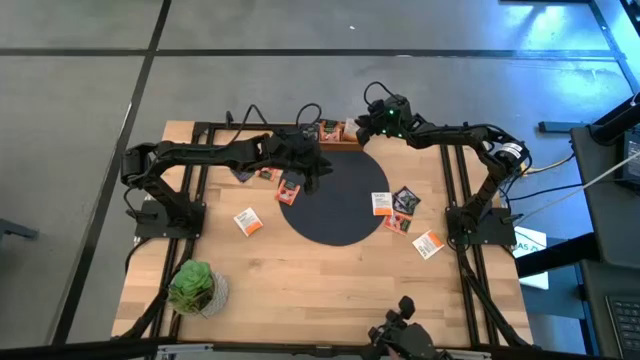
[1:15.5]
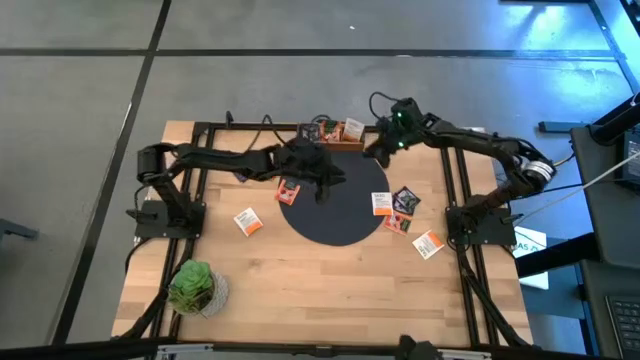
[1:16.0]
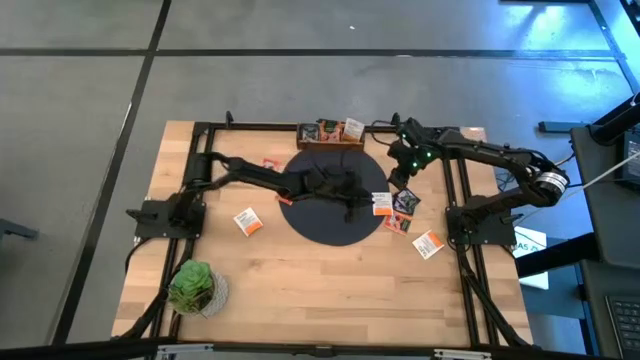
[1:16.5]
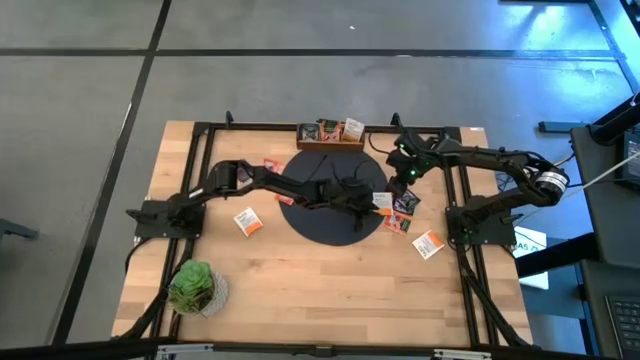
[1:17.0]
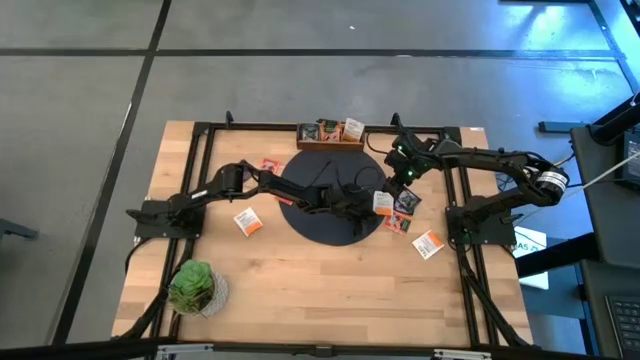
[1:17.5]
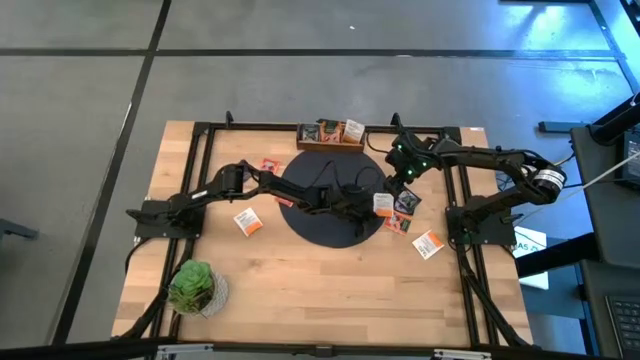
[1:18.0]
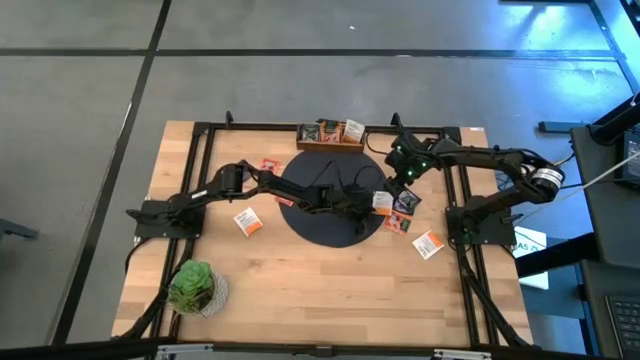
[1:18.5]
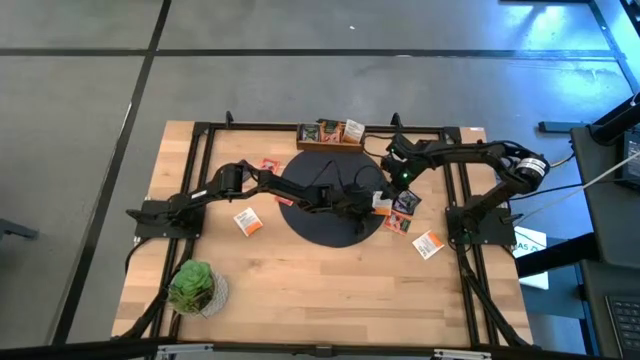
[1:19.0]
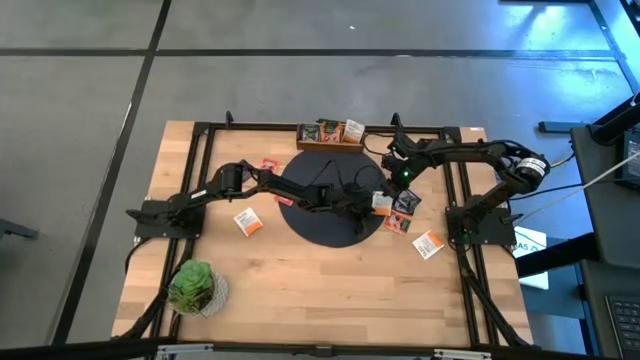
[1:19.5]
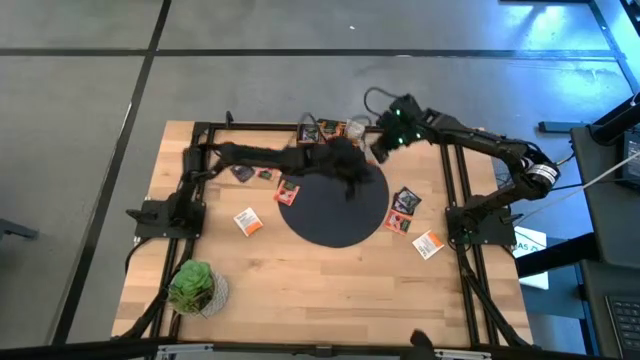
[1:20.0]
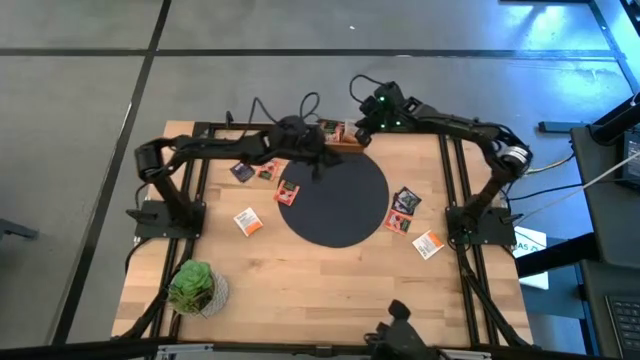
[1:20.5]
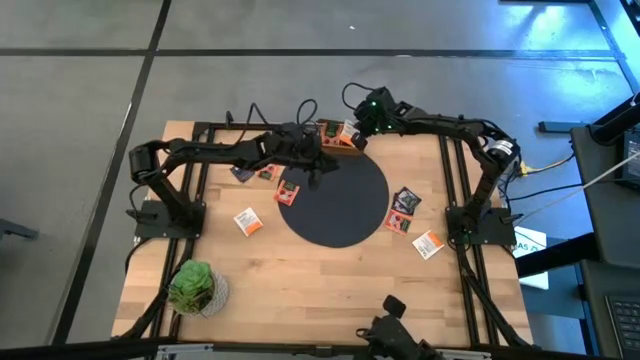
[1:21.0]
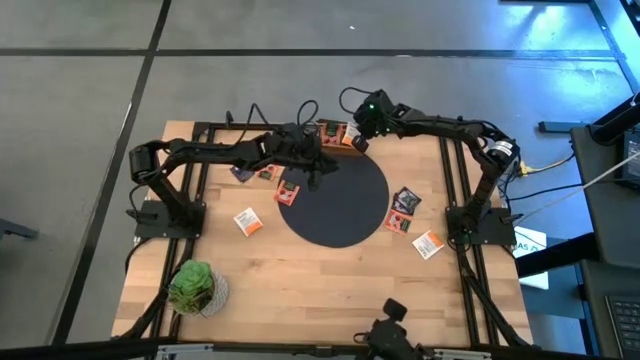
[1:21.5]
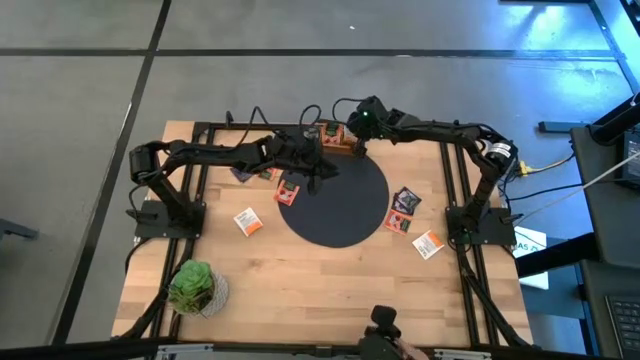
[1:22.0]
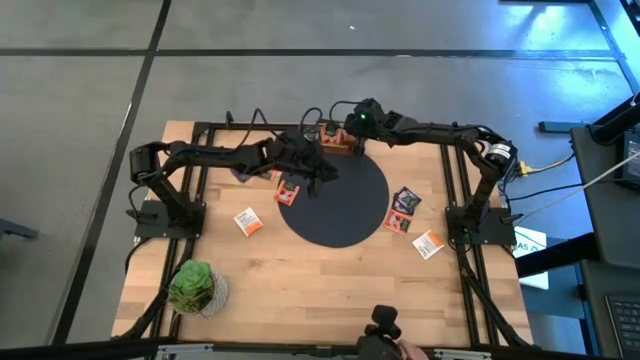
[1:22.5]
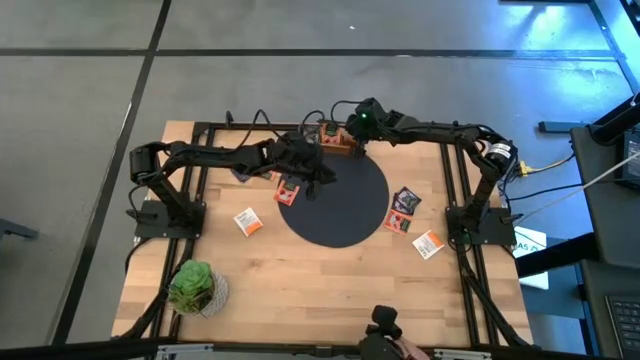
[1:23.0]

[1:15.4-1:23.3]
Task: Pick & Place Tea
Put the white tea bag into the right section of the wooden organizer

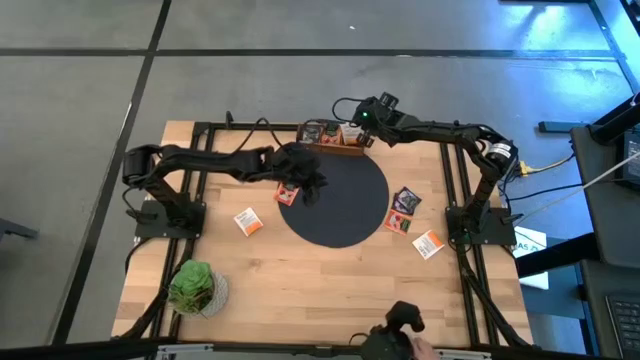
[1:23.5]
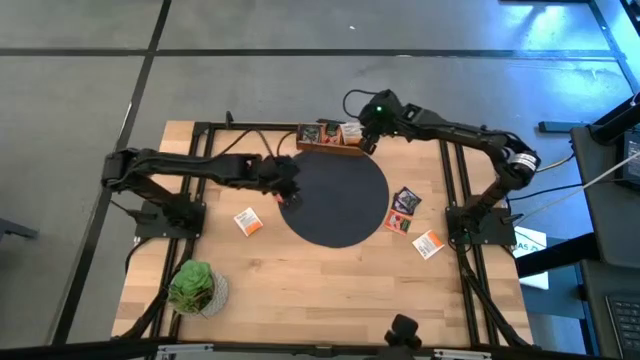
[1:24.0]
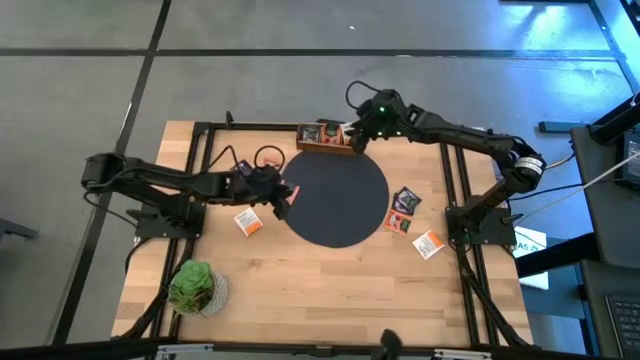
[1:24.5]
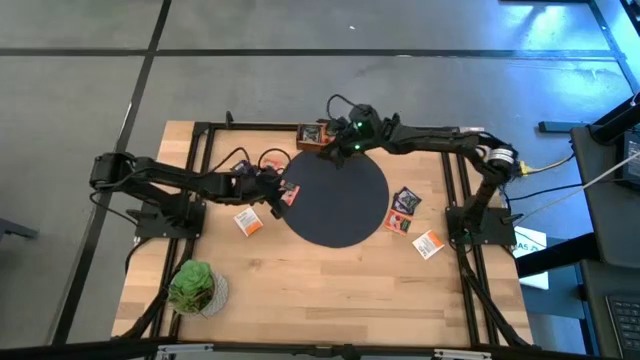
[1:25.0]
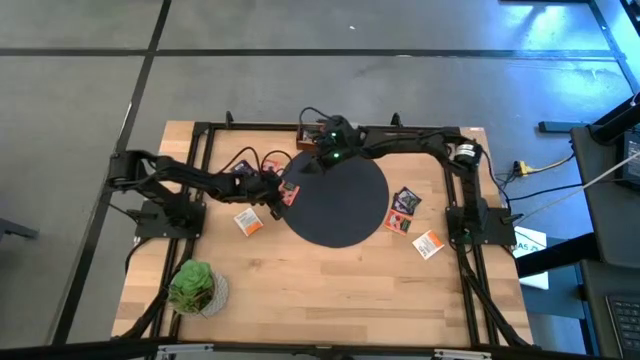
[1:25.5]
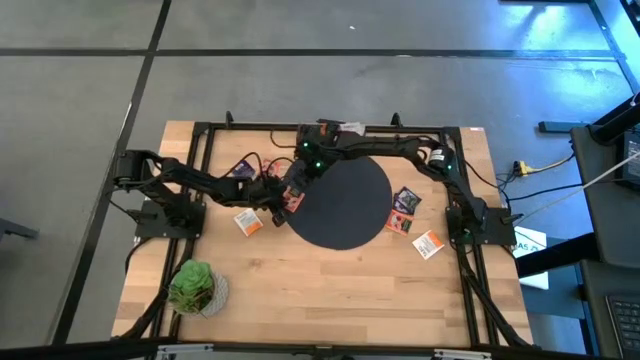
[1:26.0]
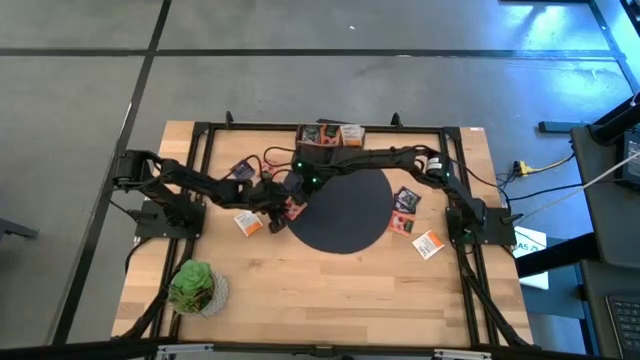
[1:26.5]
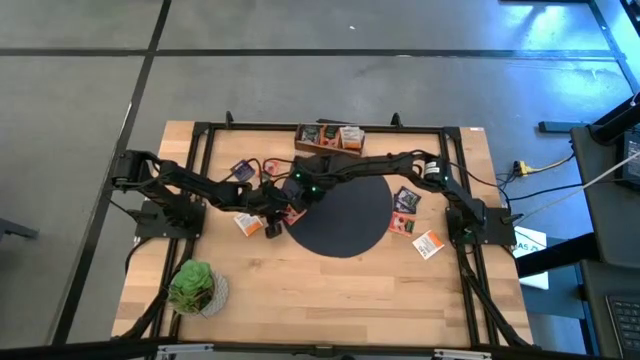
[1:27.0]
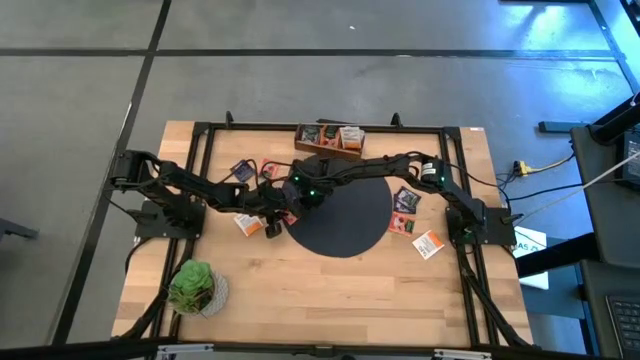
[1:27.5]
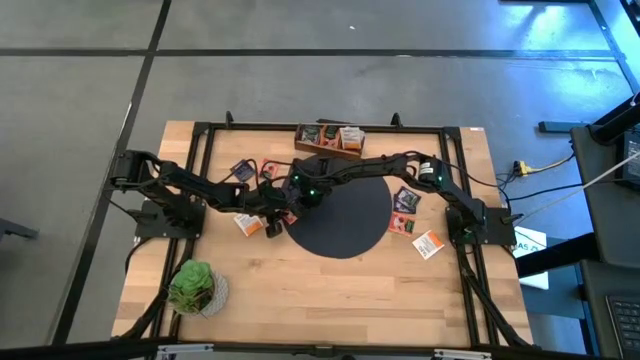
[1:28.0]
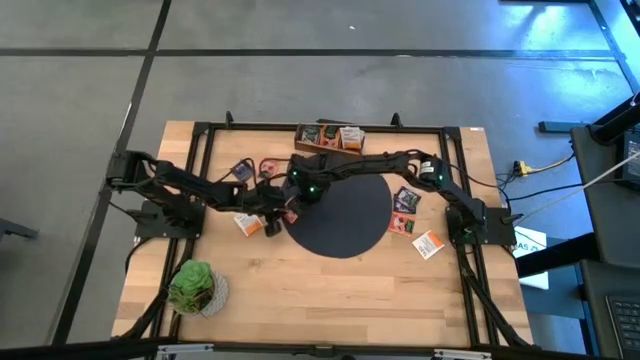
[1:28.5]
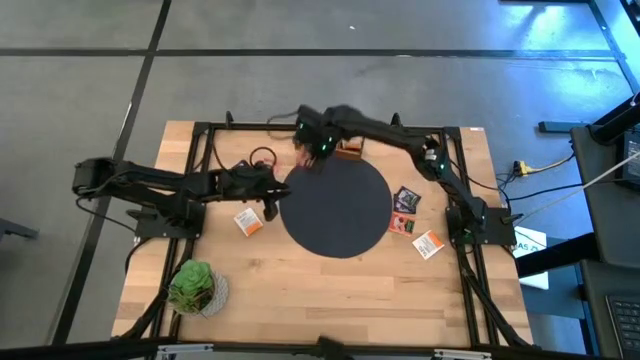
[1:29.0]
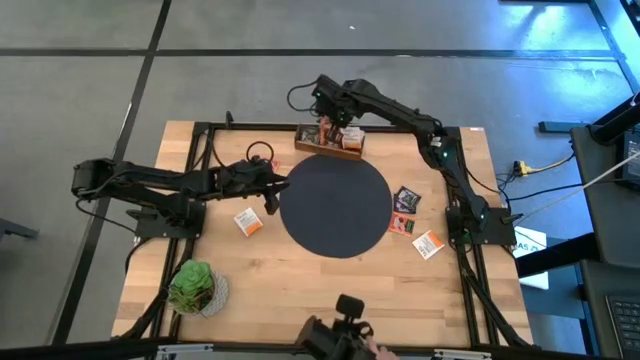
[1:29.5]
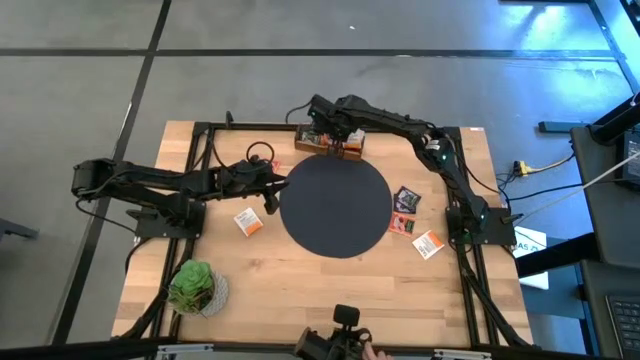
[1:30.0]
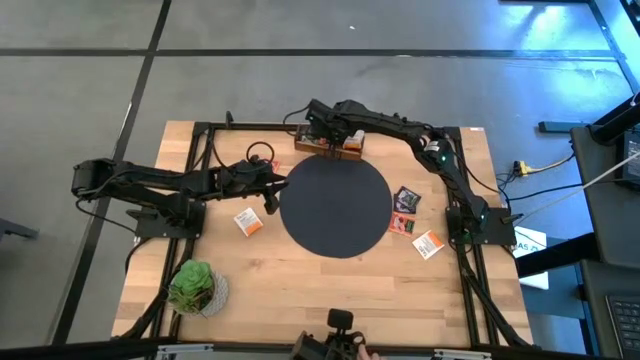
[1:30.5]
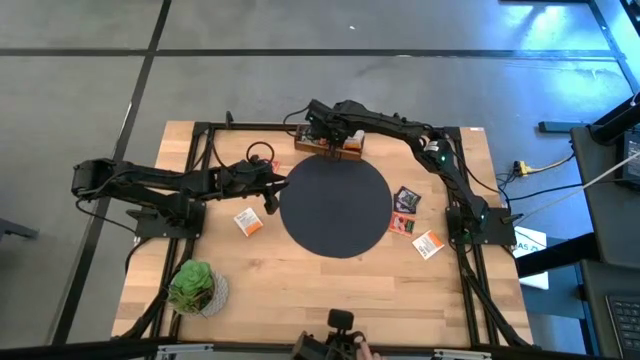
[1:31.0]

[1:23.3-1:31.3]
Put the orange tea bag into the middle section of the wooden organizer

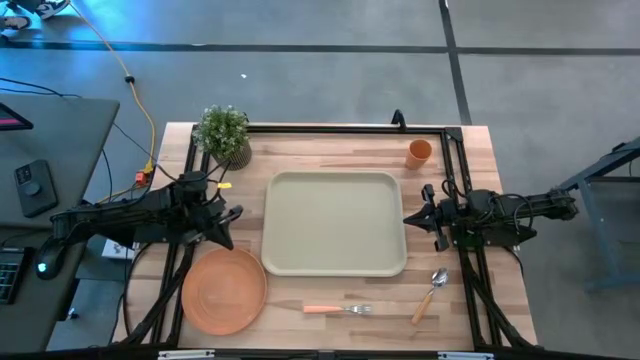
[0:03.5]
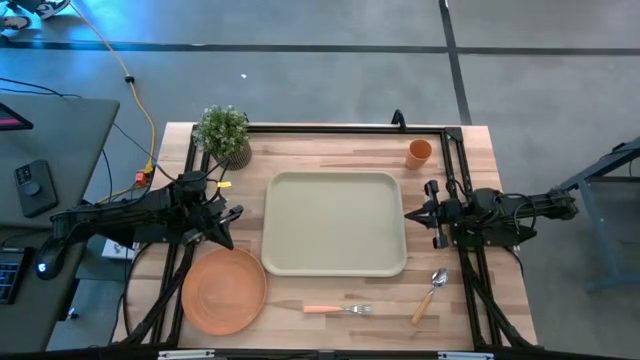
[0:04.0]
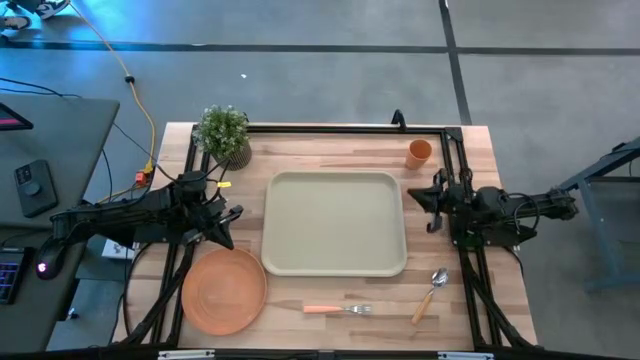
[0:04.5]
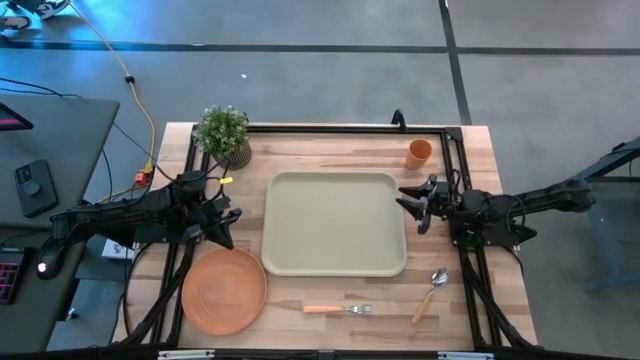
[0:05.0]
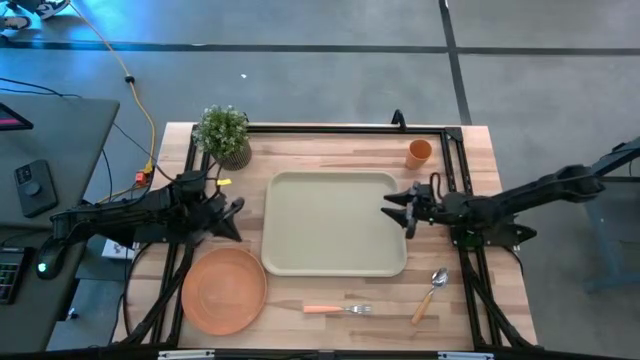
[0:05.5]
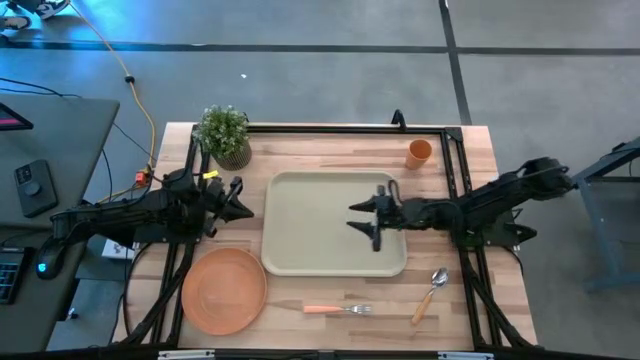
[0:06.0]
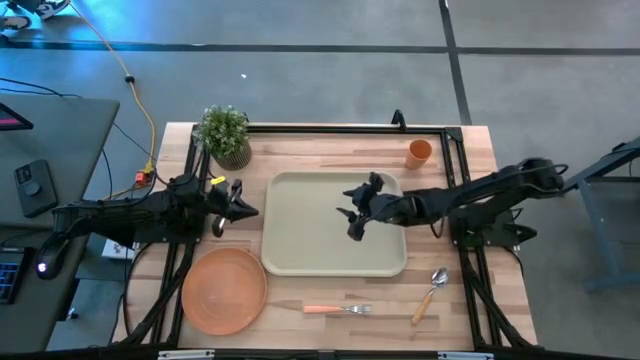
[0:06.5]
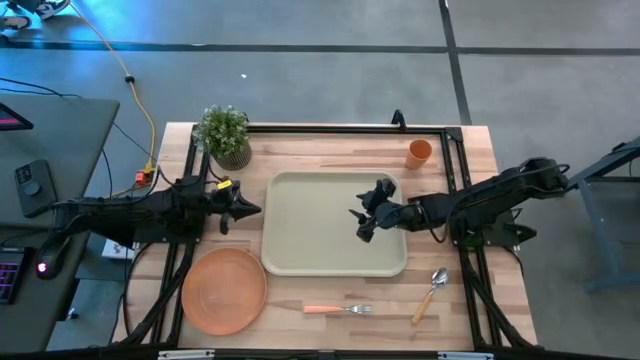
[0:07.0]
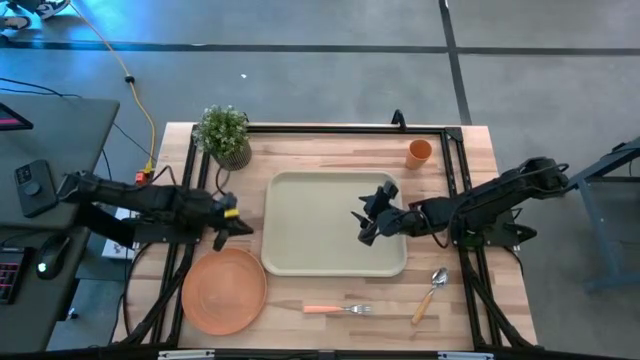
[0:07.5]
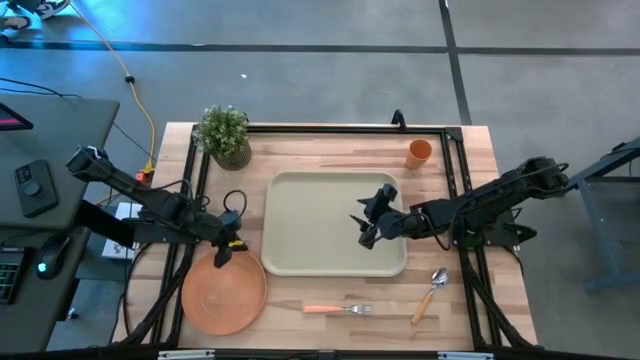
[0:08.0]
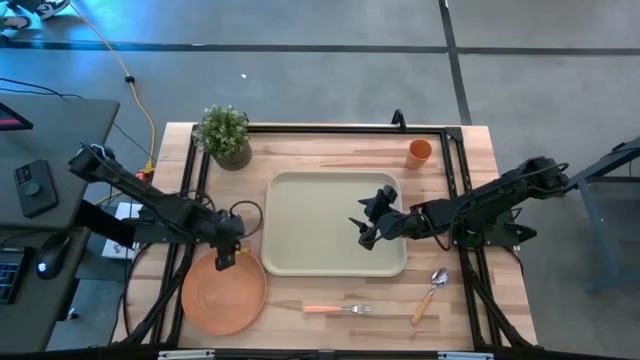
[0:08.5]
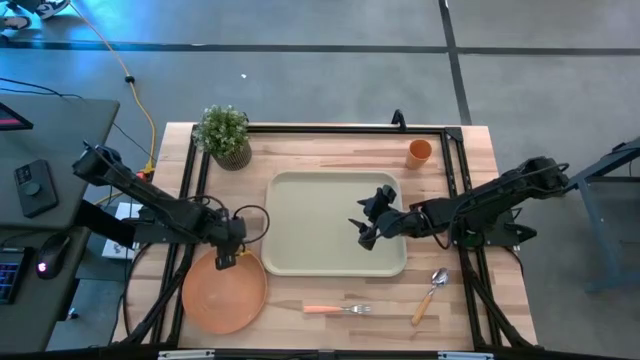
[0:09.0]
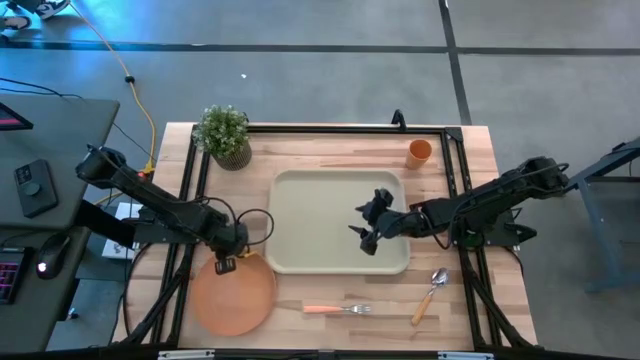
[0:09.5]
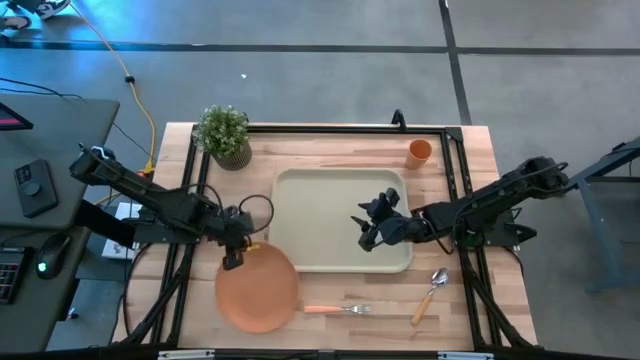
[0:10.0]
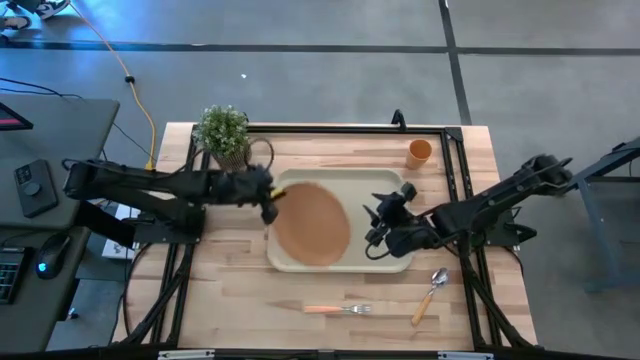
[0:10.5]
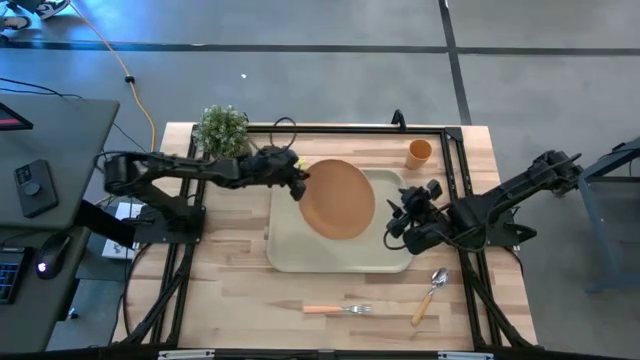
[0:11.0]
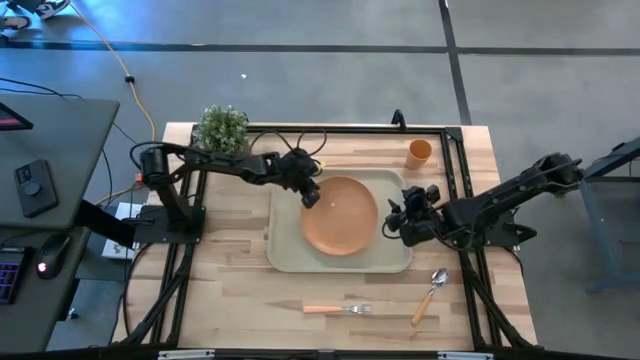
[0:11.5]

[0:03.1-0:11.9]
Task: Pick and place plate/cup/fork/spoon on tray
Put the light orange plate on the light brown tray
